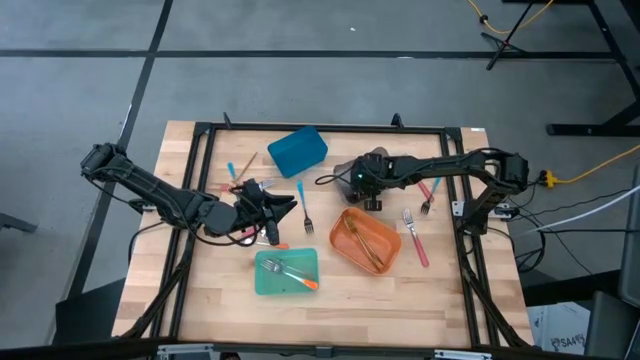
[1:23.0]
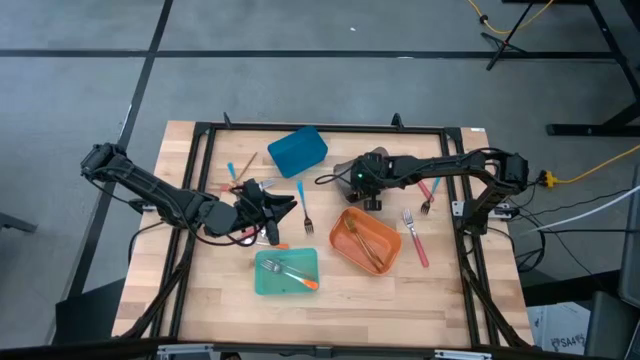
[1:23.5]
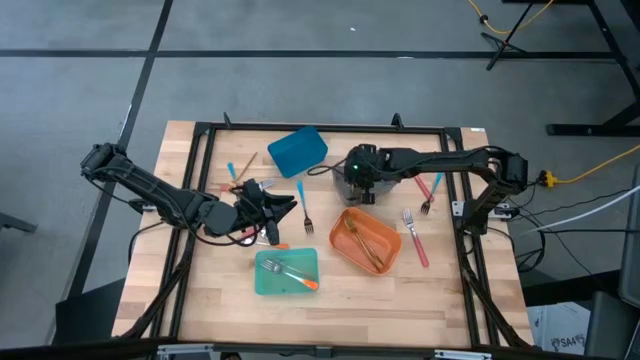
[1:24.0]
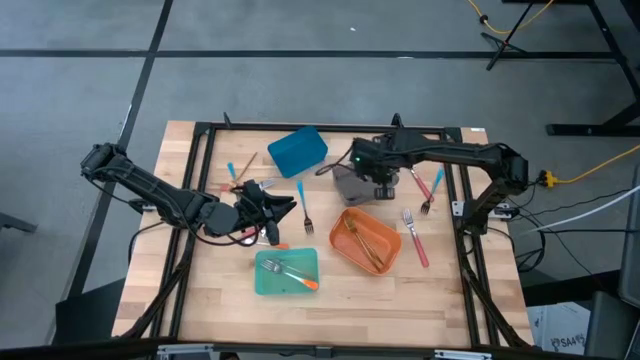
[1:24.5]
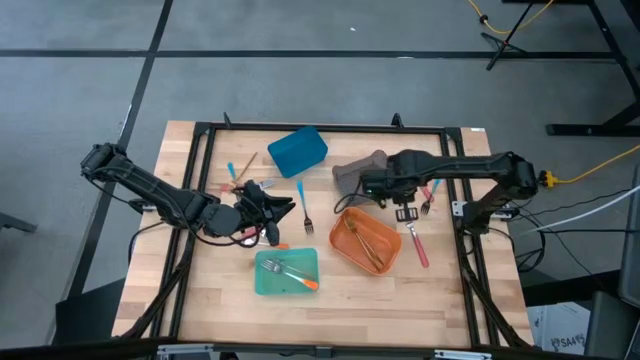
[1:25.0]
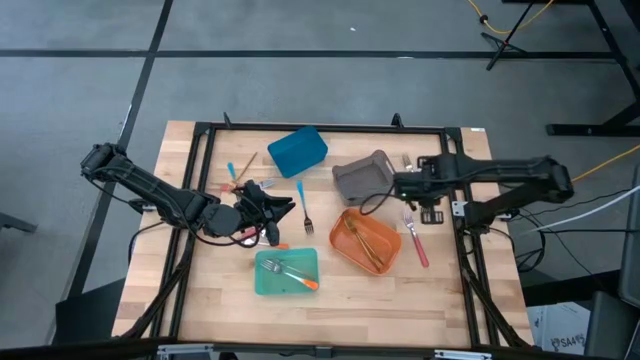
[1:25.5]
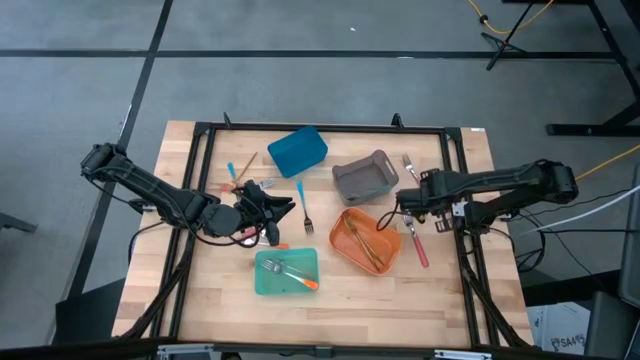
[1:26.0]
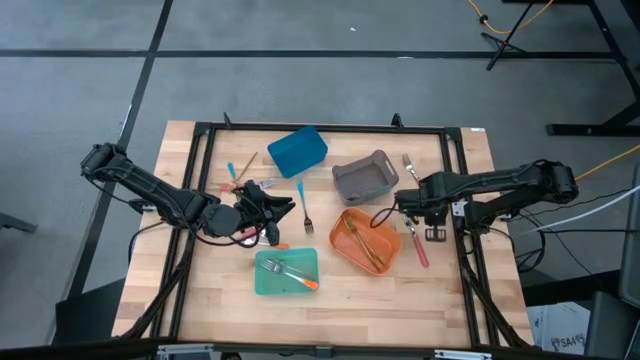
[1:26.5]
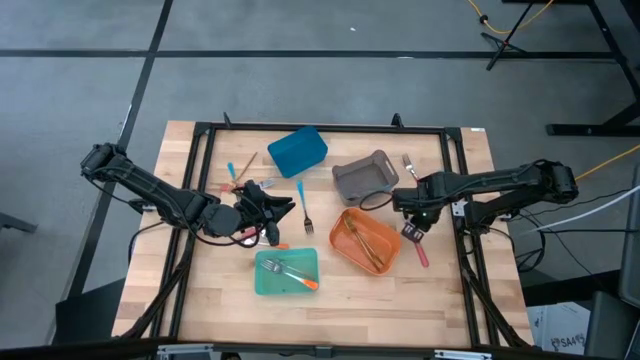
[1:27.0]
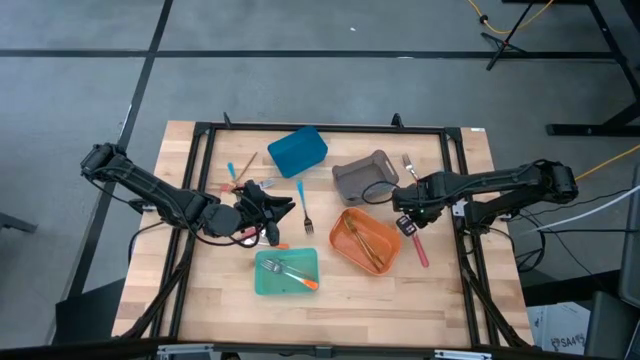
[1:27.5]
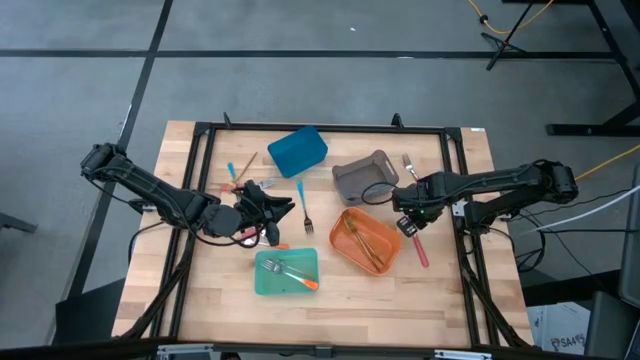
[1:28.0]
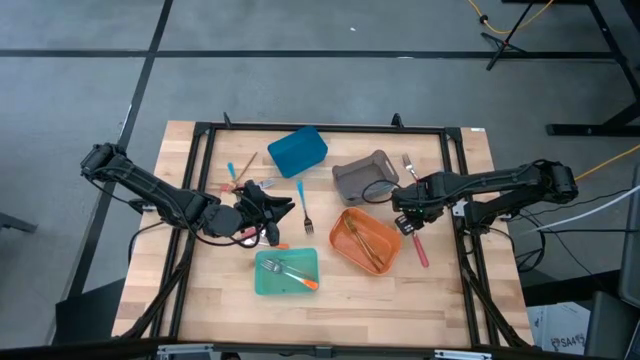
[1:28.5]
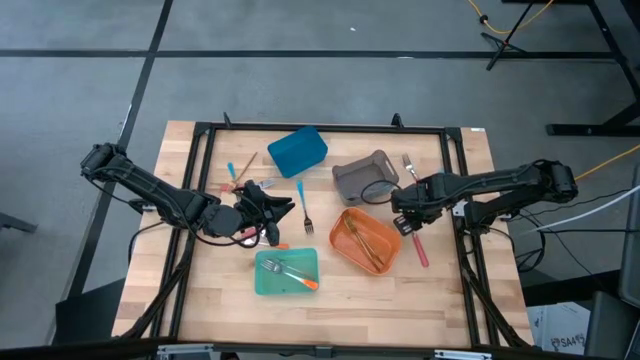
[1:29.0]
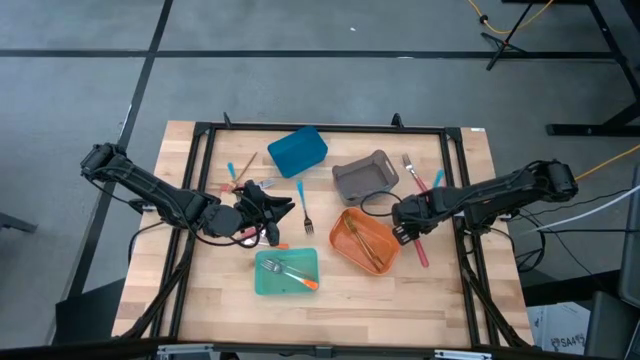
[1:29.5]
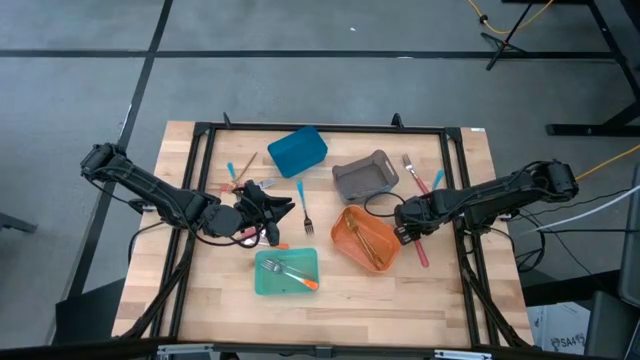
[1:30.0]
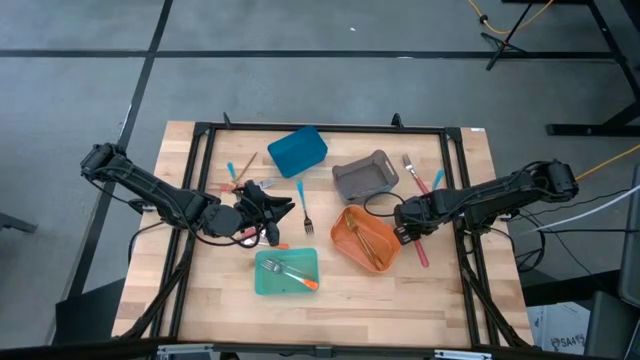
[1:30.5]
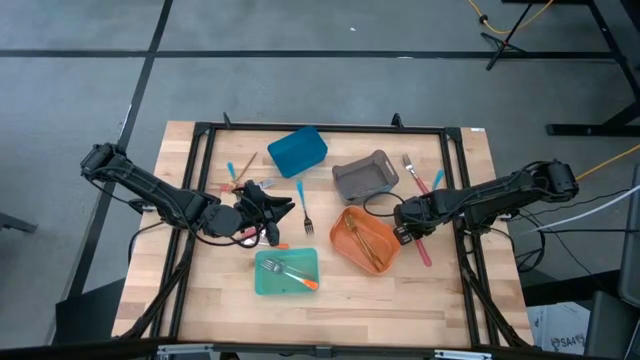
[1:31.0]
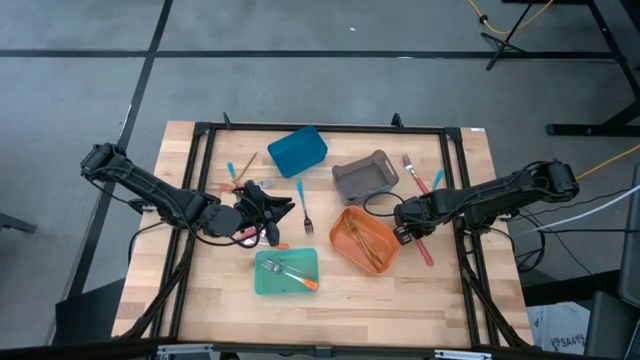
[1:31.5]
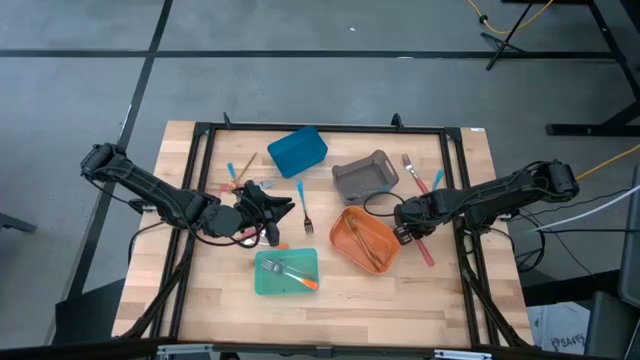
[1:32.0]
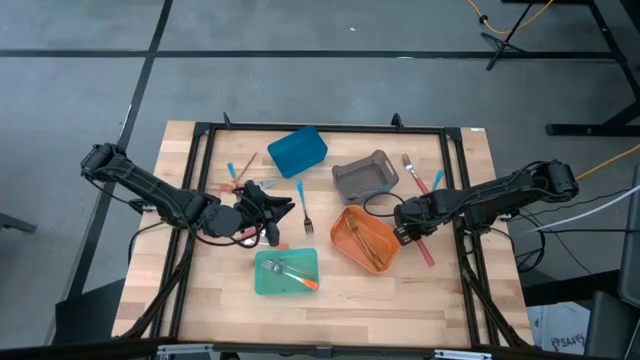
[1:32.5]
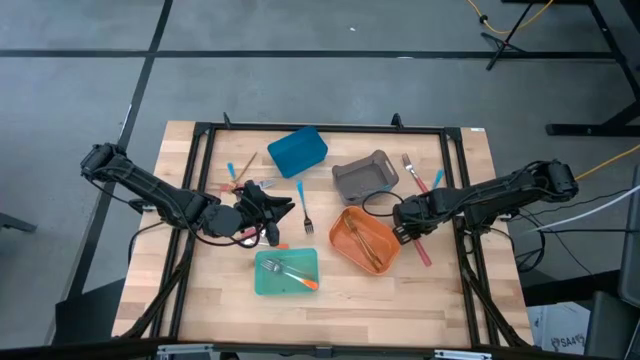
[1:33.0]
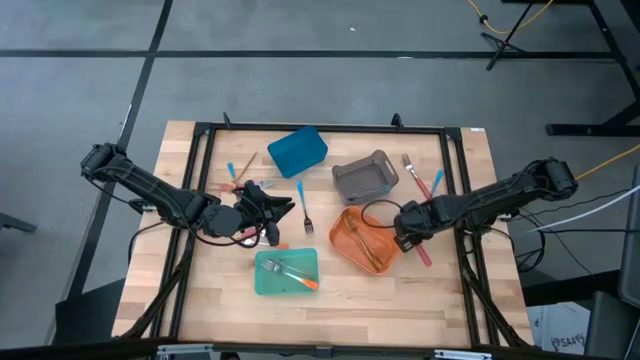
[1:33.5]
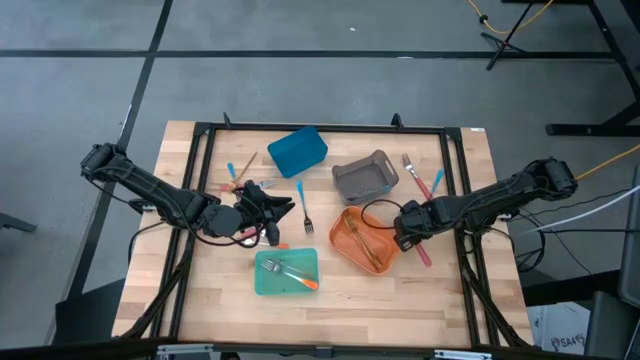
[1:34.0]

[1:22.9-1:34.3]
Task: Sort silverware by color (type)
Put the pink fork into the blue bin

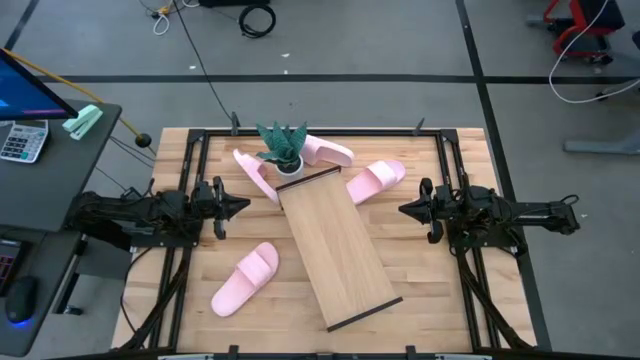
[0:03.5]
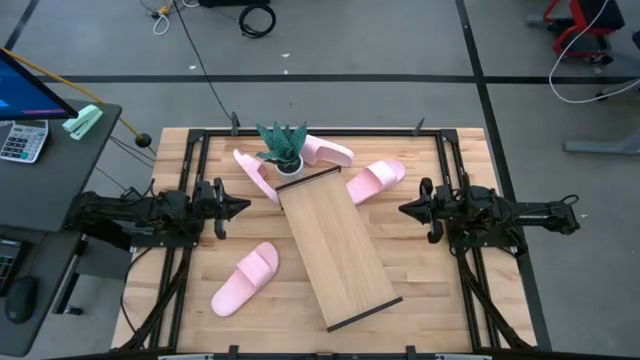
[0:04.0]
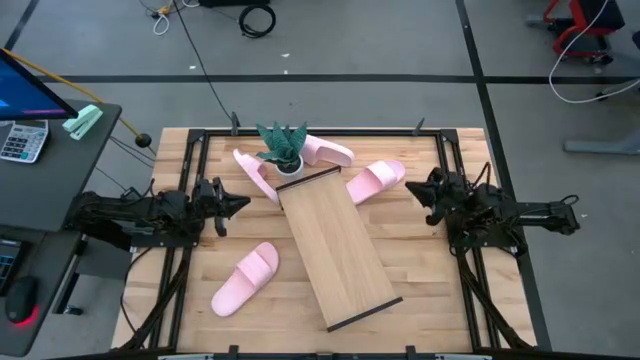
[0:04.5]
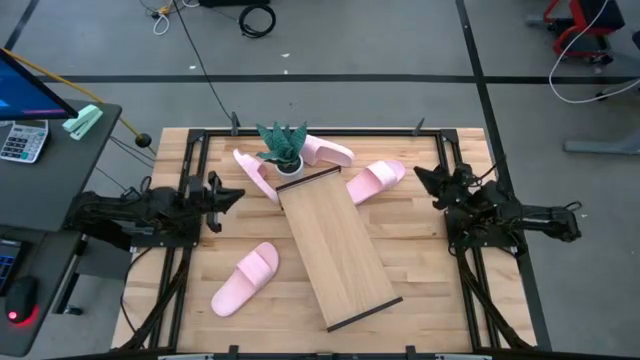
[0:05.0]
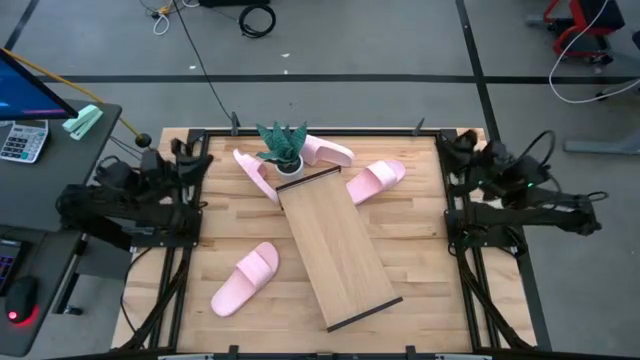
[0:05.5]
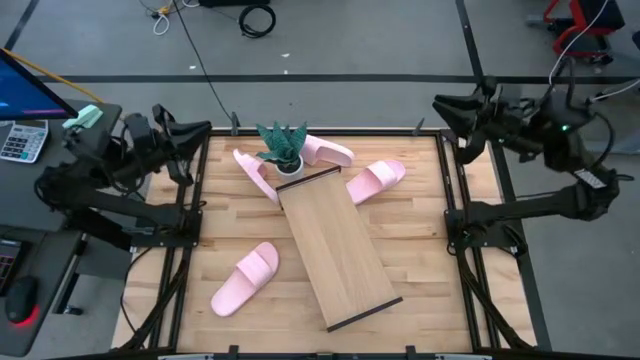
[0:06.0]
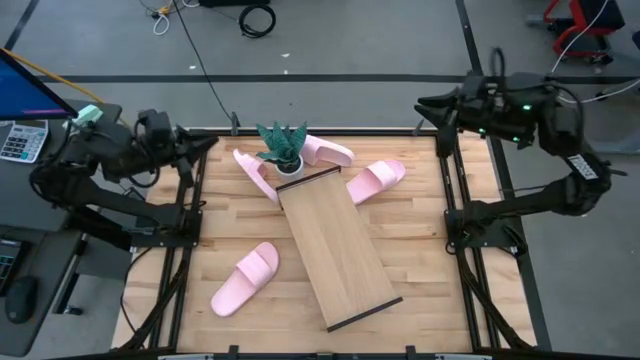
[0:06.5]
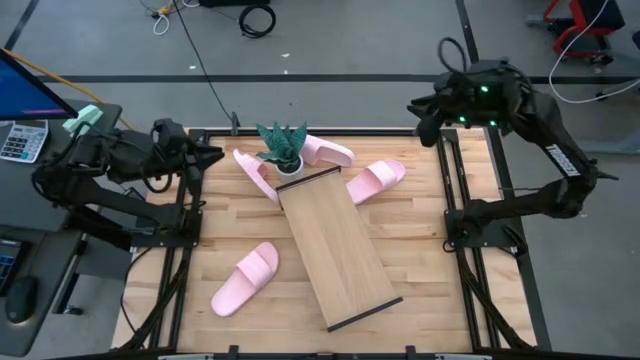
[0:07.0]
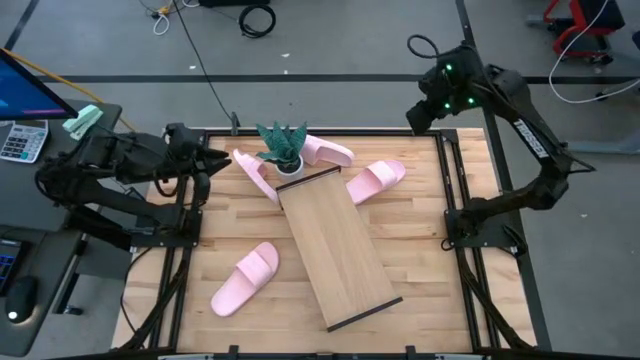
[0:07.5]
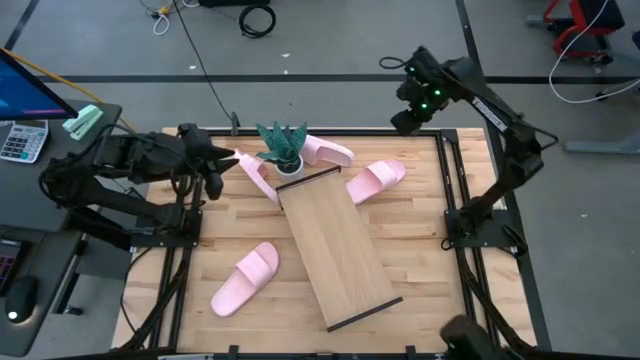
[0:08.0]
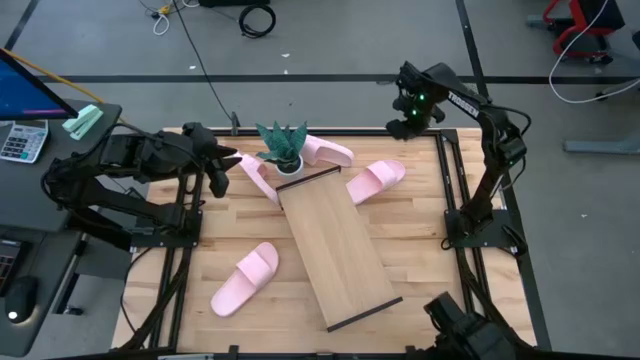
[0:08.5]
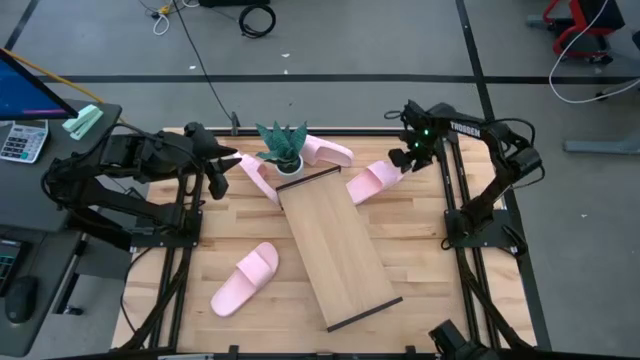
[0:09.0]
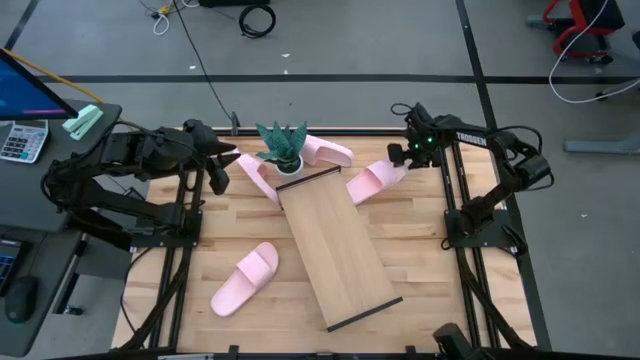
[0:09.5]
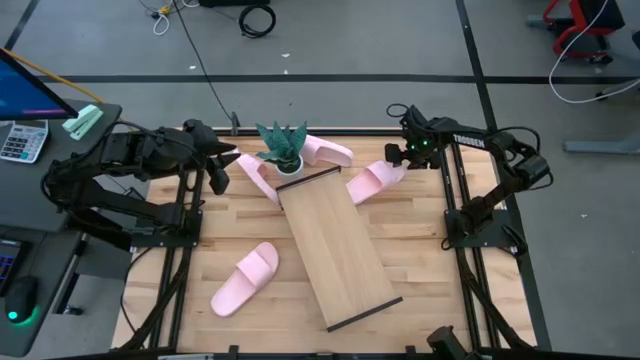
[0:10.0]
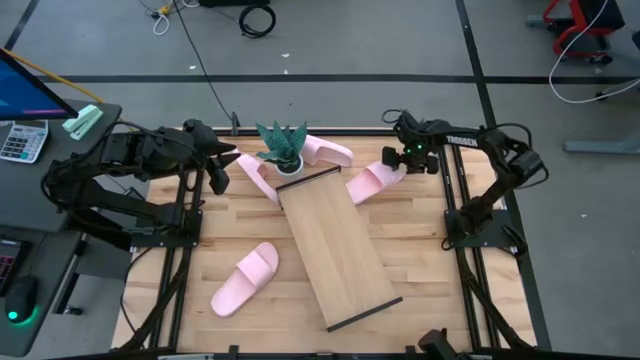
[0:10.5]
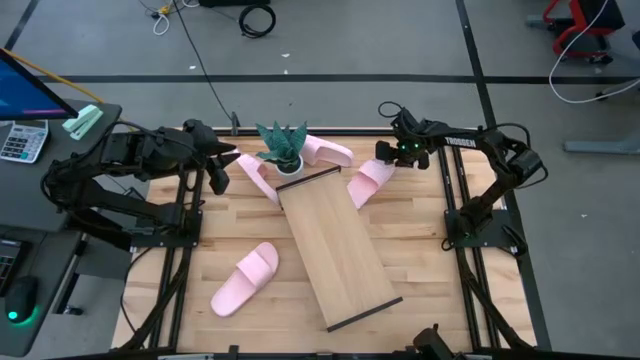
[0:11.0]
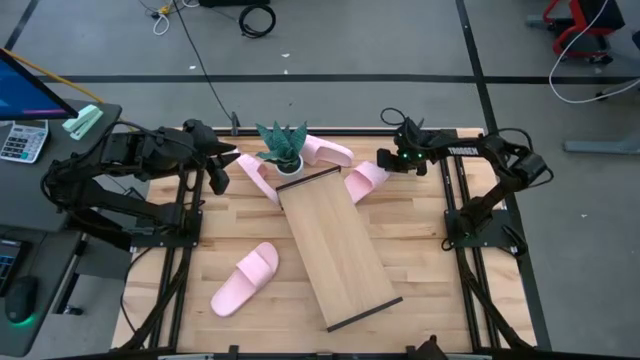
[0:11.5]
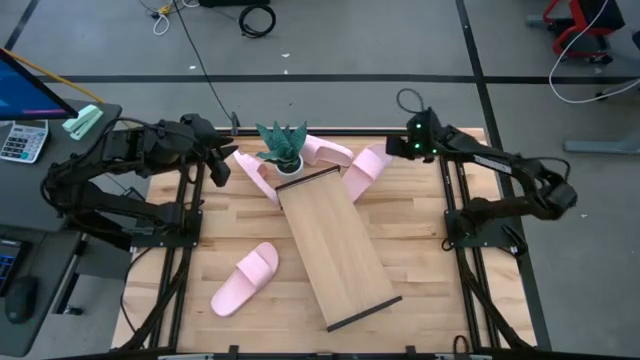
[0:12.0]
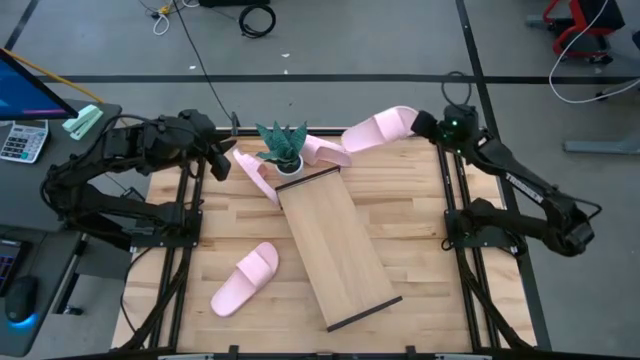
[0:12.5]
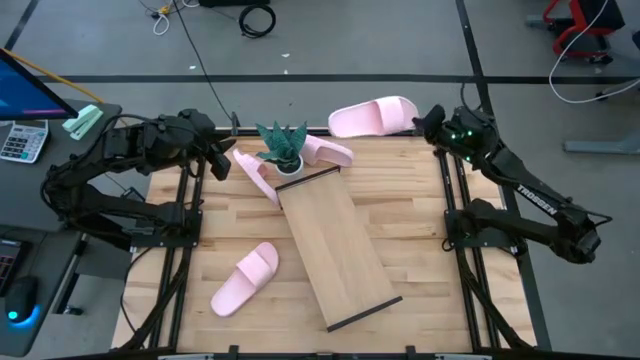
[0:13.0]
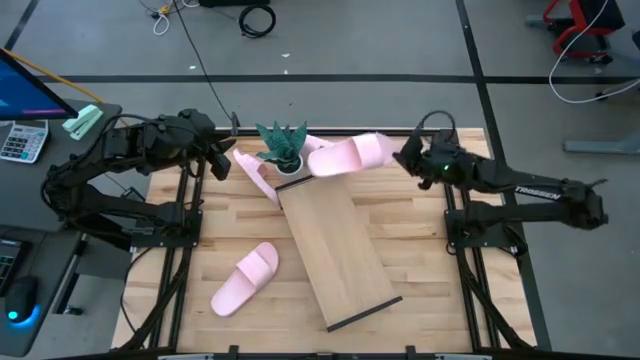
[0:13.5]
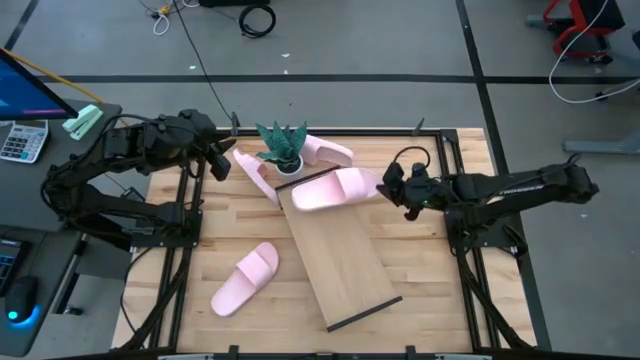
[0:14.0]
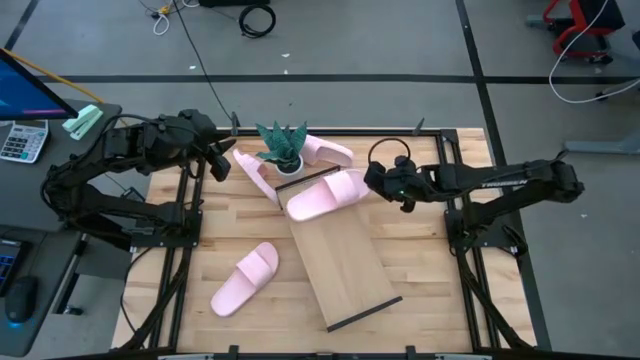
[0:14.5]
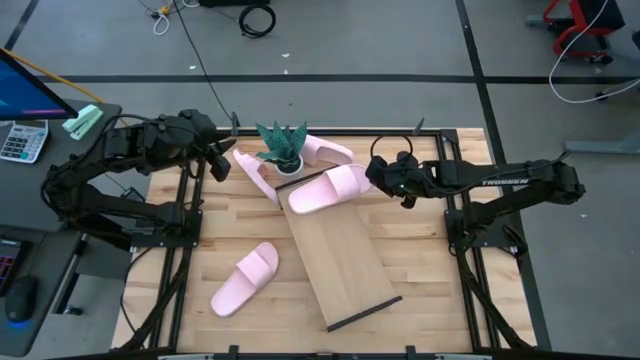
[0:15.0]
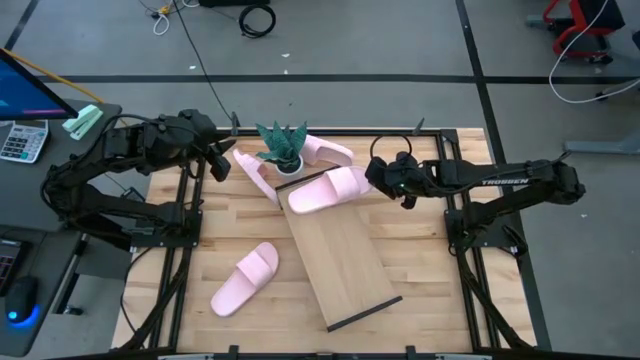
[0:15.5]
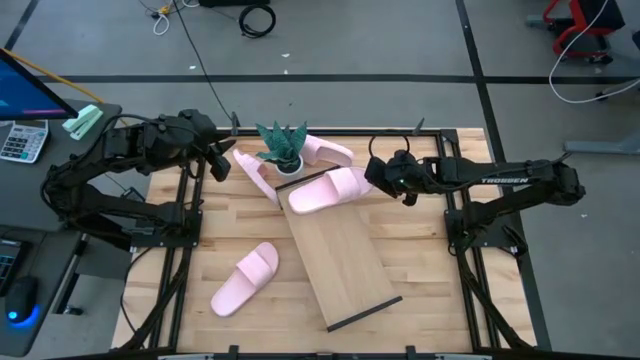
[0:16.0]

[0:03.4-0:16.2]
Task: Pick and place slides into the shelf
Put the top right pink slipper on the shelf
